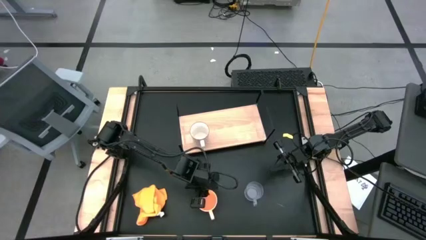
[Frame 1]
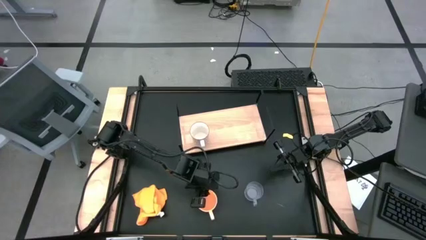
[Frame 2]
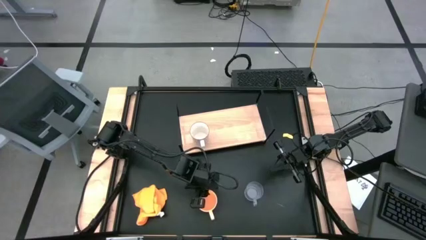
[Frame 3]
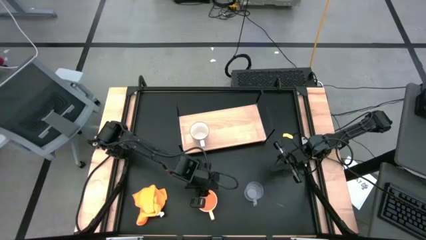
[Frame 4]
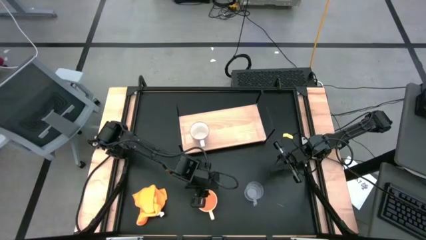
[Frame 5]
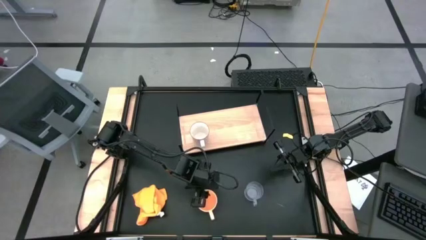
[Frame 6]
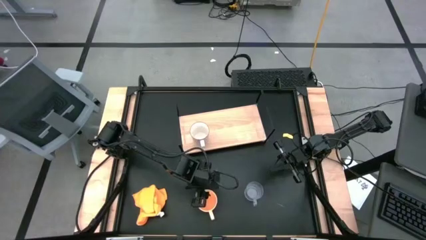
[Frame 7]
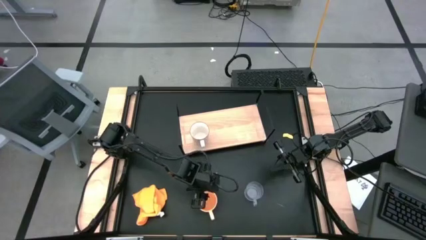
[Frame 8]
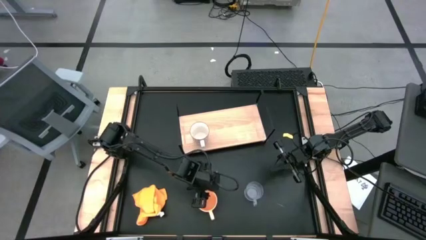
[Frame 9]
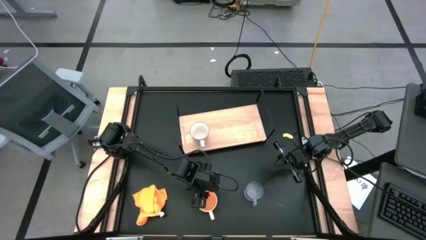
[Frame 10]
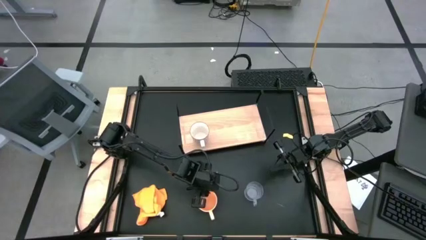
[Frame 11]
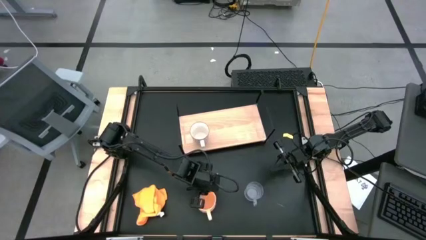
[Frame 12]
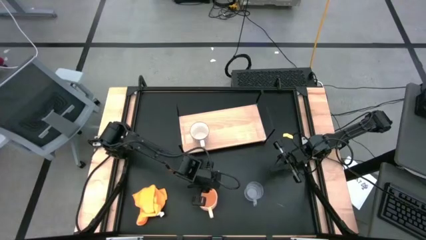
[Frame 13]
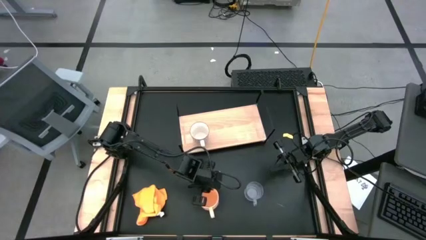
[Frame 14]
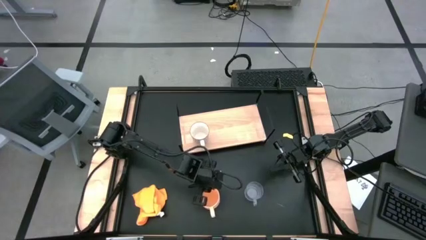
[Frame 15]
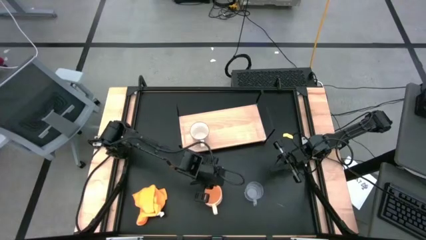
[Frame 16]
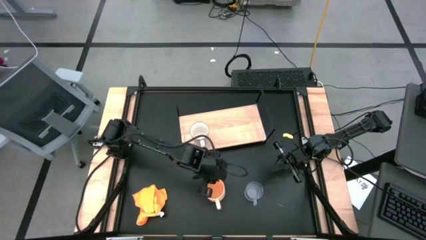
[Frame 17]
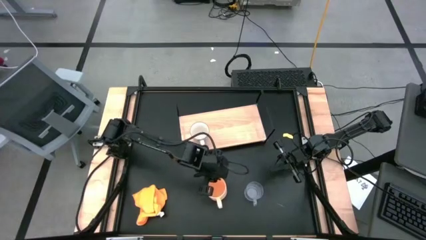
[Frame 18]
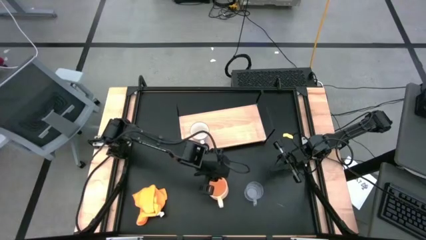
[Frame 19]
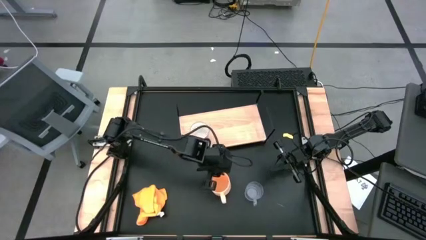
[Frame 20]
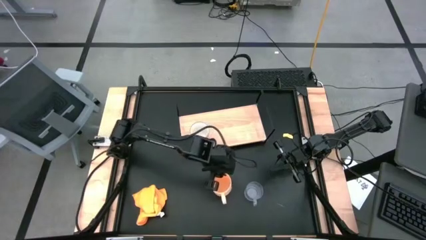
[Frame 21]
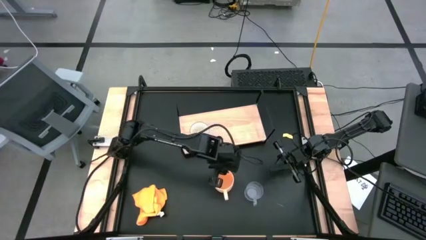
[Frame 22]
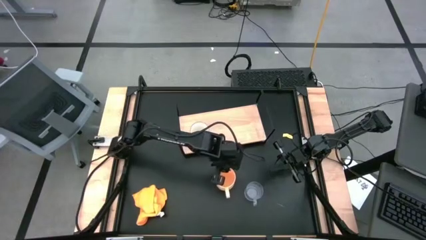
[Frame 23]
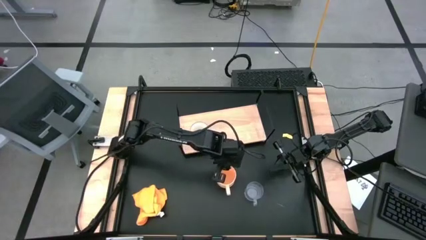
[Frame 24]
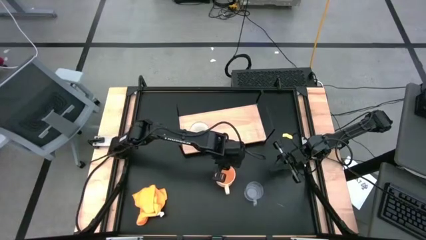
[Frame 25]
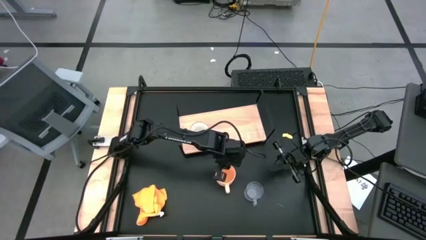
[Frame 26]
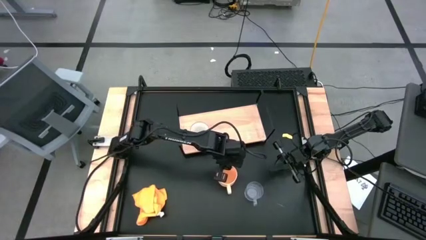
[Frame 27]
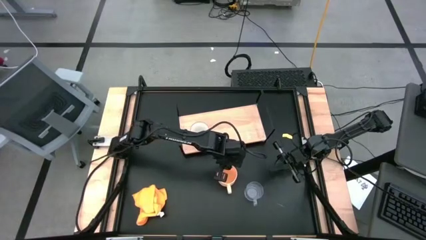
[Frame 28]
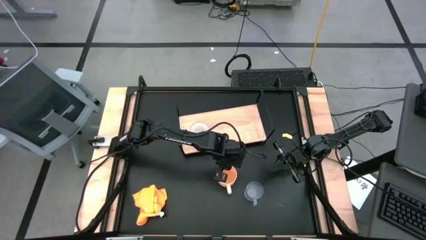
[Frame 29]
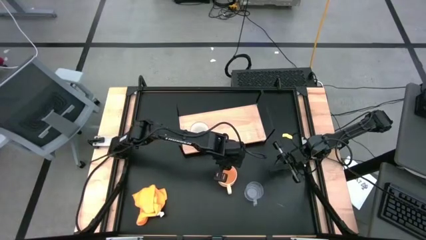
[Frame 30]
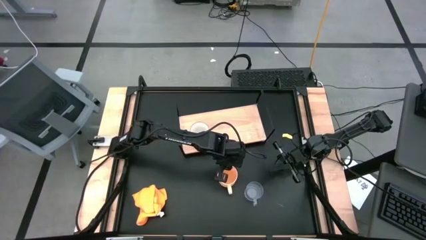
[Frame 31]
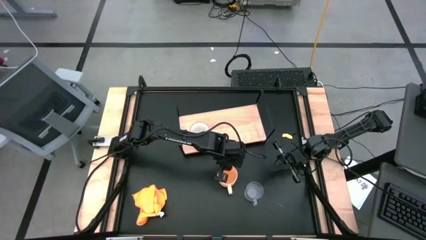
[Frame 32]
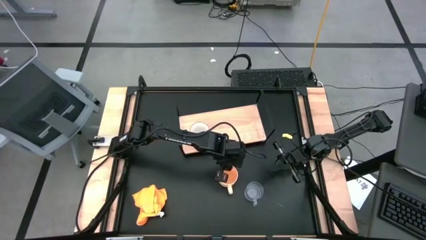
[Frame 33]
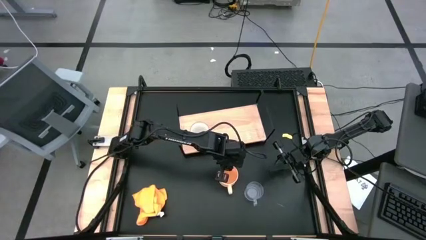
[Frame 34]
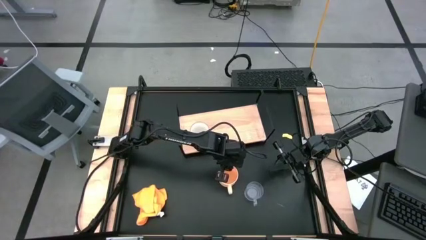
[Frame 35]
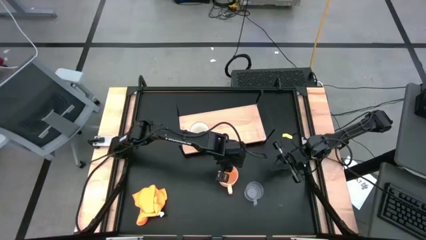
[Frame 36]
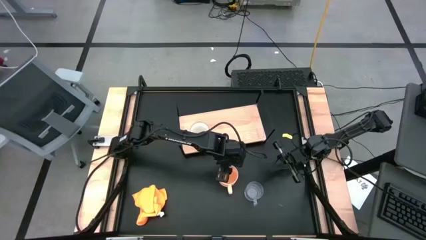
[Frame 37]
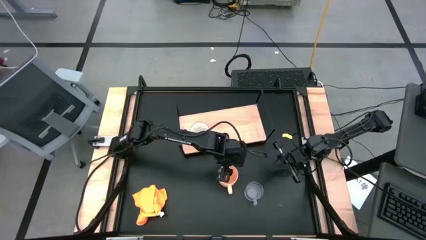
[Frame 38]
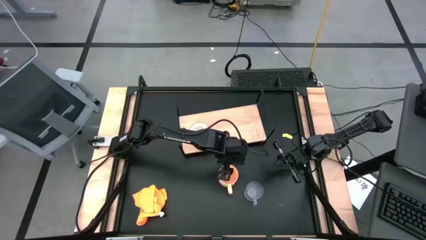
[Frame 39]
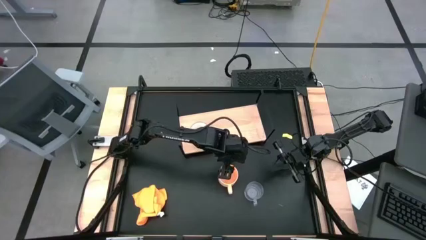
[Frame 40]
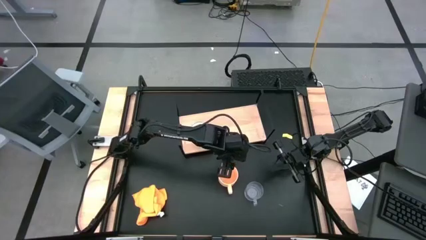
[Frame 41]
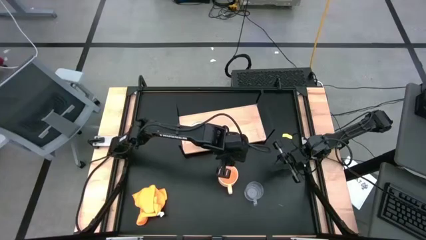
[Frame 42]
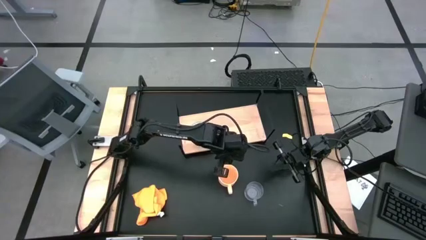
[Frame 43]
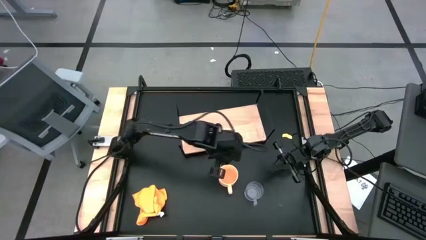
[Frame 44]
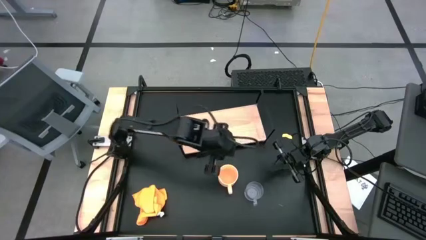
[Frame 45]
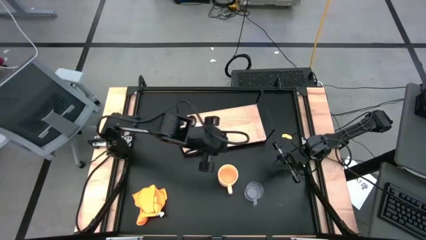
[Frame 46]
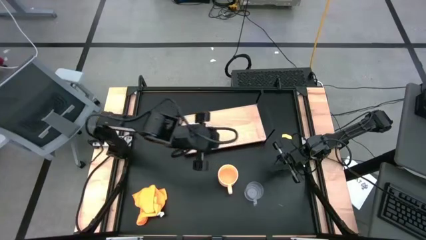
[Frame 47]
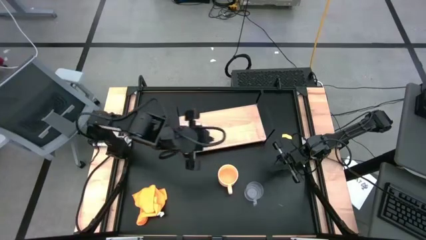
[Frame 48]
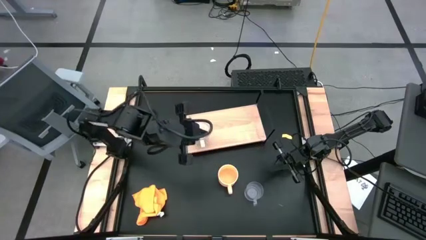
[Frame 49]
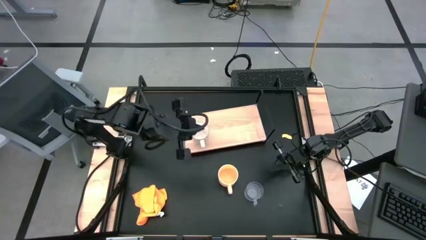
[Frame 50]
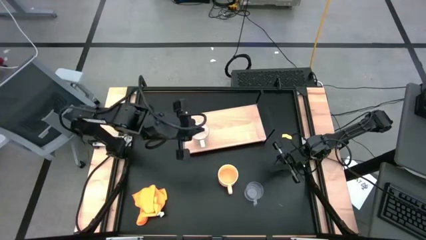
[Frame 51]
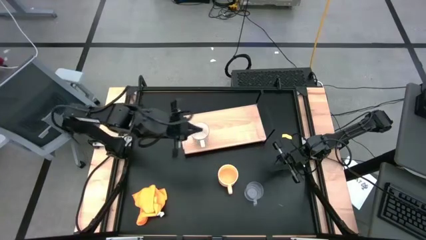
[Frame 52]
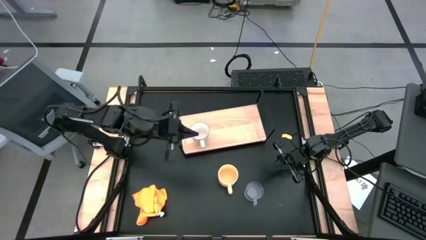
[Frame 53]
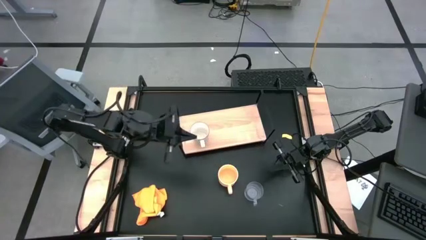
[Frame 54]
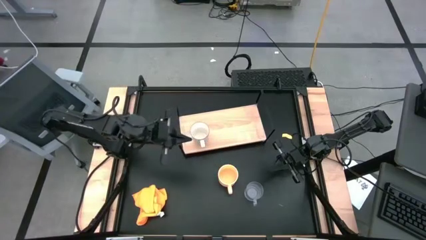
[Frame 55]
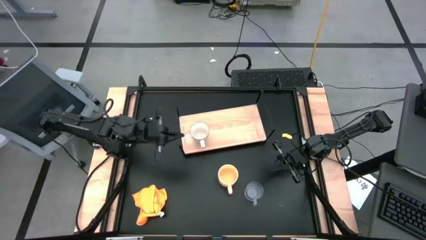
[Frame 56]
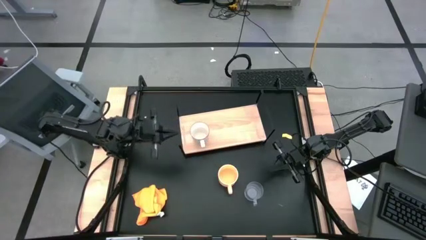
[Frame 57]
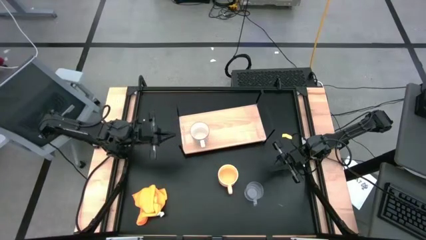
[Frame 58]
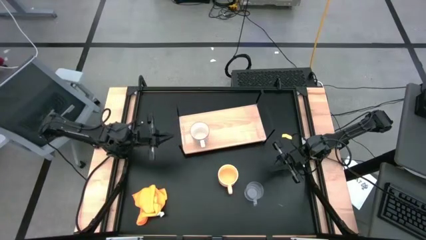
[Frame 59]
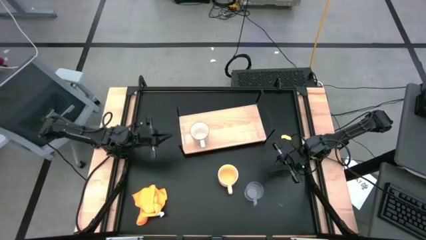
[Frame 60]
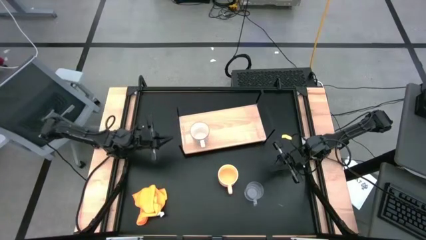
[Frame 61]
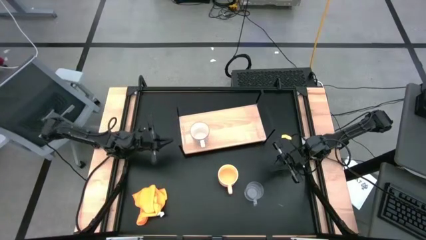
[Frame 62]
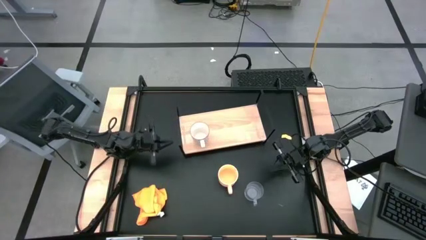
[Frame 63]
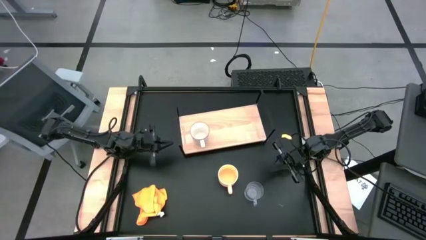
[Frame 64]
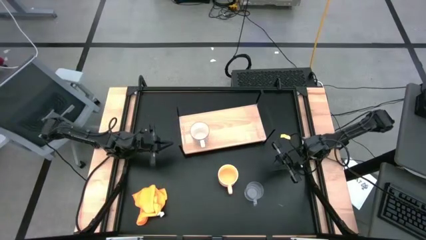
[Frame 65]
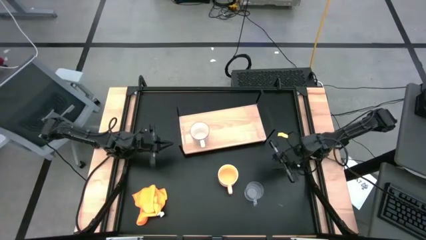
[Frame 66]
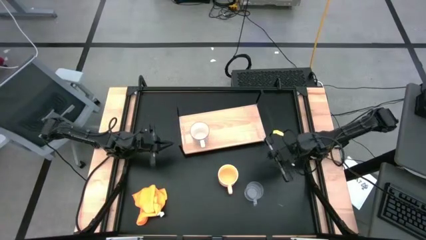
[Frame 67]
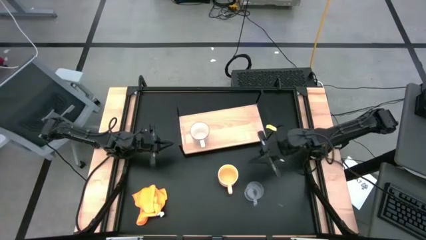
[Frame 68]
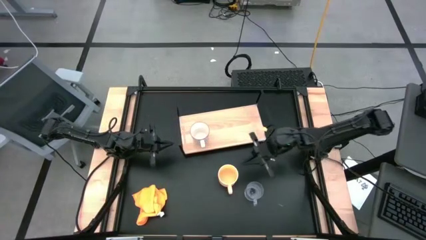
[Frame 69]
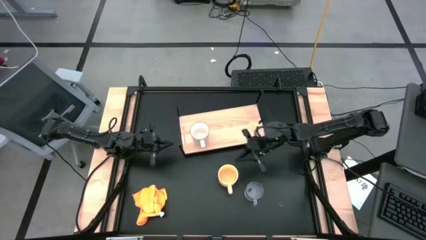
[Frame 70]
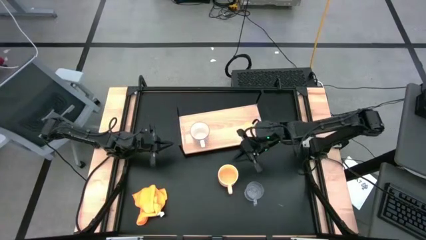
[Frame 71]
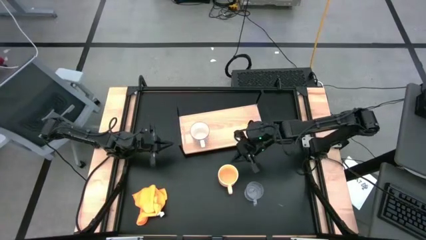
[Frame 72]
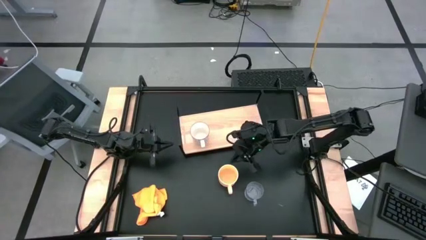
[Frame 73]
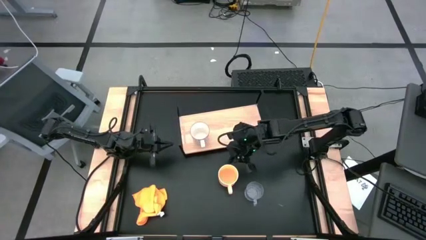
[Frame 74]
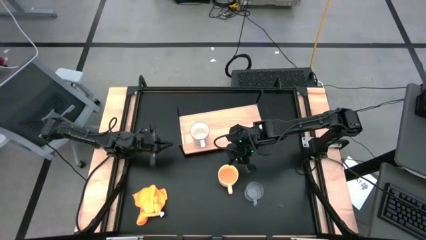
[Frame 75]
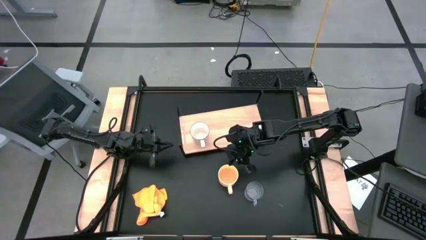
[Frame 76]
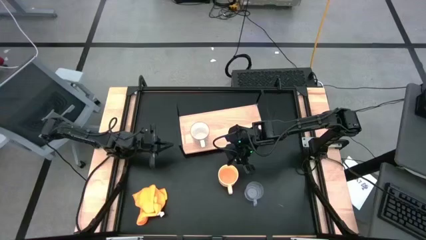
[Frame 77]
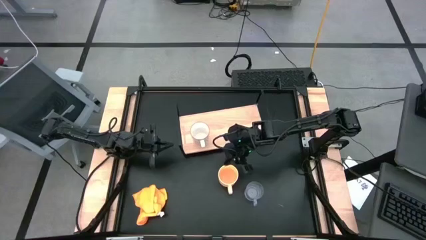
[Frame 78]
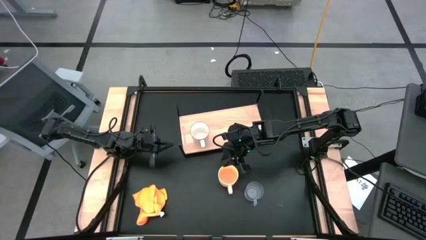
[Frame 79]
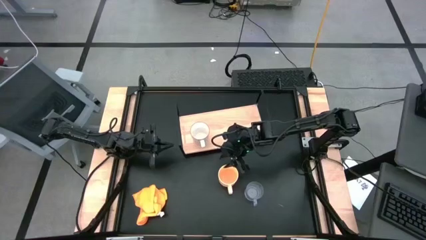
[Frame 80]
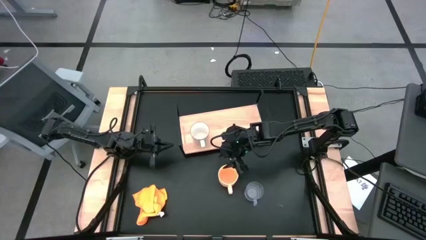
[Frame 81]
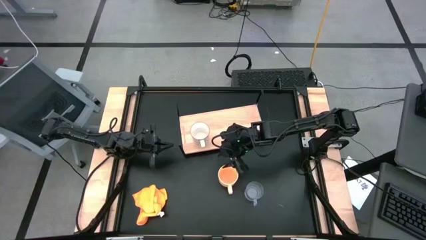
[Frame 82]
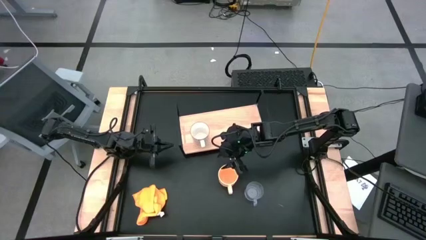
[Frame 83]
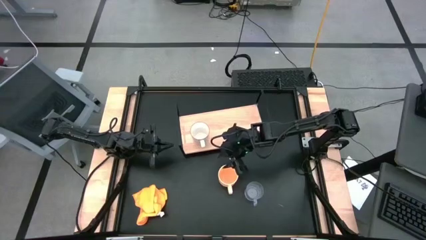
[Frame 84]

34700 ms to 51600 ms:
Task: Stack small to large cups/mugs on shelf
Put the yellow mug on the shelf
